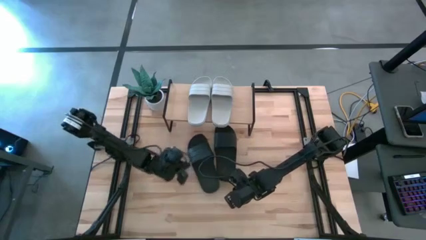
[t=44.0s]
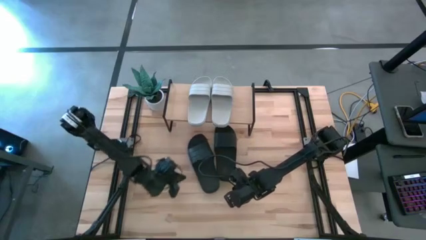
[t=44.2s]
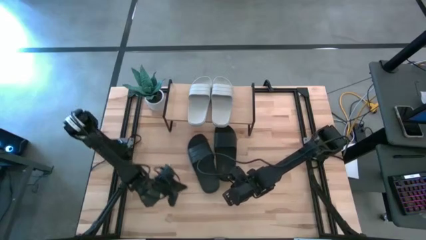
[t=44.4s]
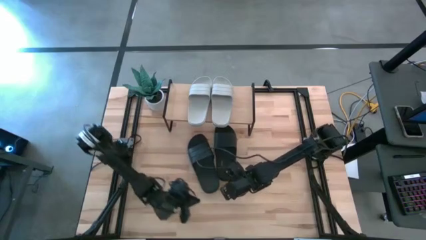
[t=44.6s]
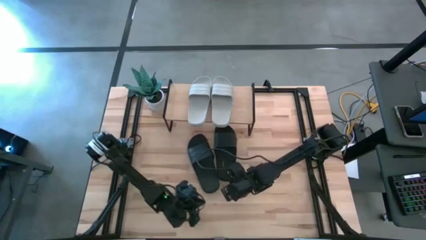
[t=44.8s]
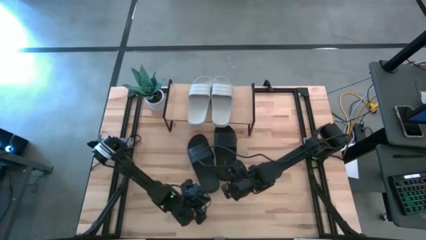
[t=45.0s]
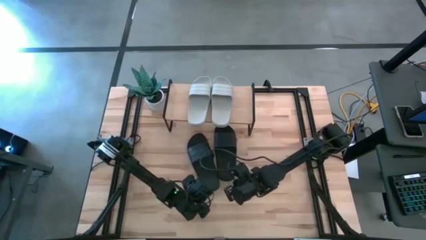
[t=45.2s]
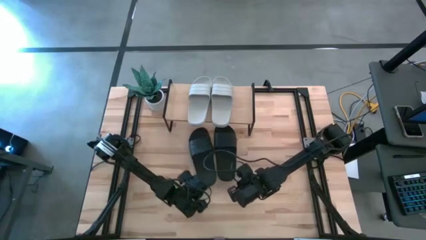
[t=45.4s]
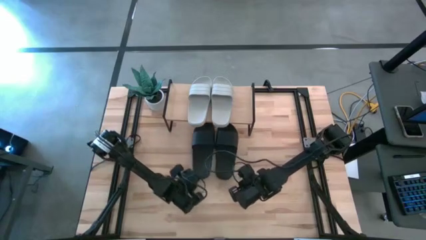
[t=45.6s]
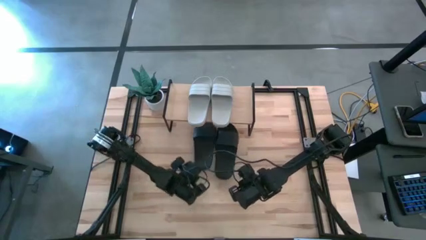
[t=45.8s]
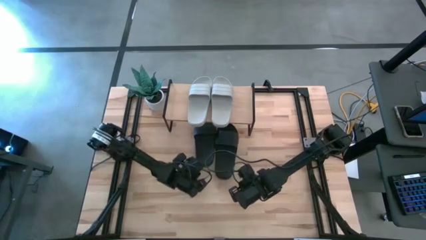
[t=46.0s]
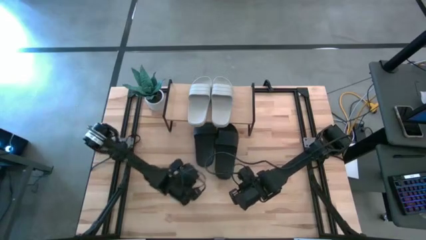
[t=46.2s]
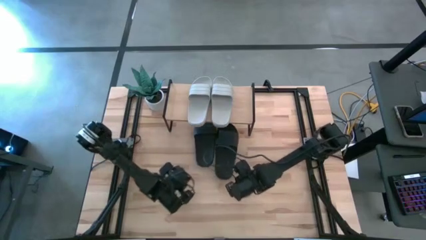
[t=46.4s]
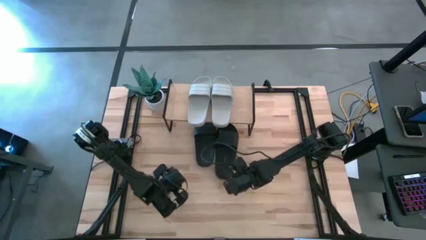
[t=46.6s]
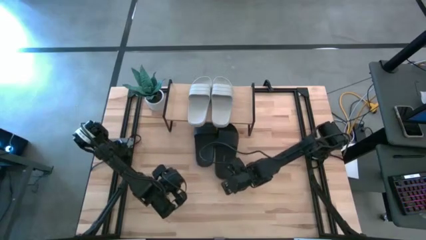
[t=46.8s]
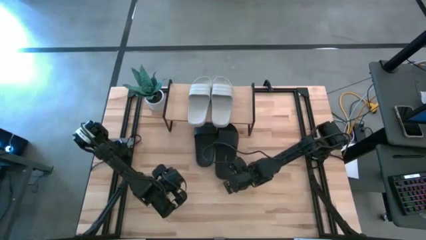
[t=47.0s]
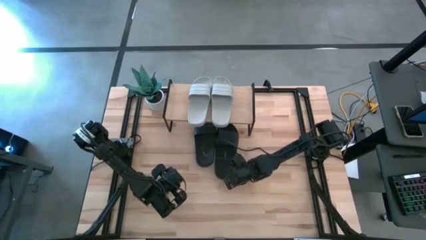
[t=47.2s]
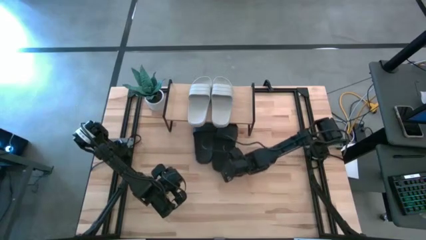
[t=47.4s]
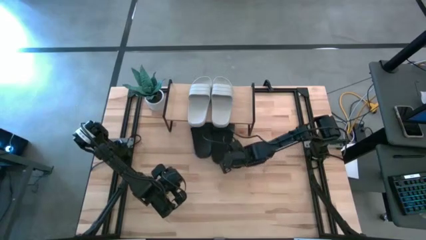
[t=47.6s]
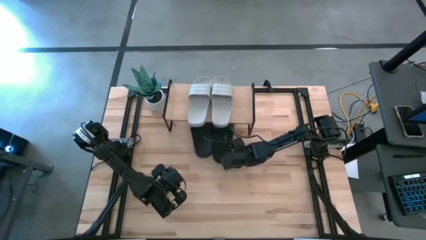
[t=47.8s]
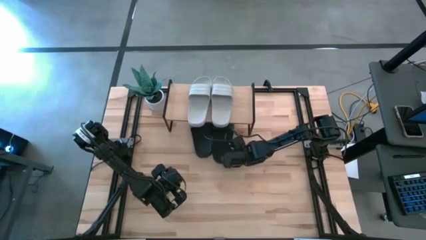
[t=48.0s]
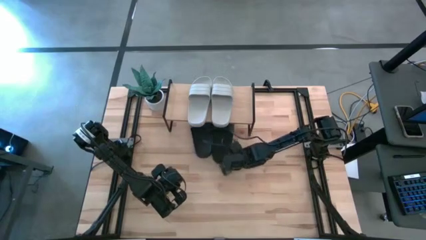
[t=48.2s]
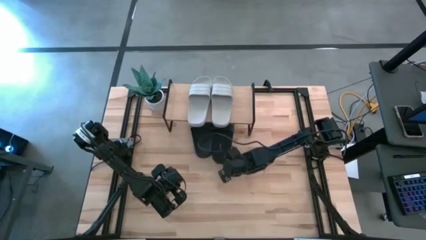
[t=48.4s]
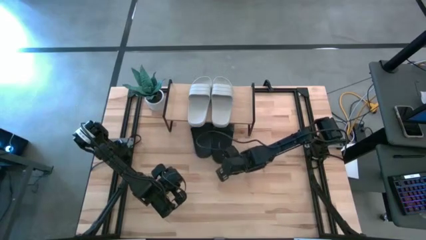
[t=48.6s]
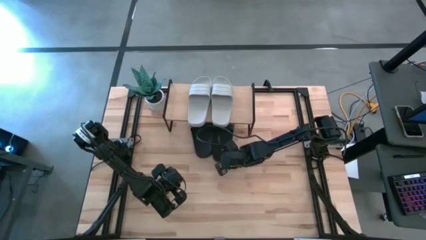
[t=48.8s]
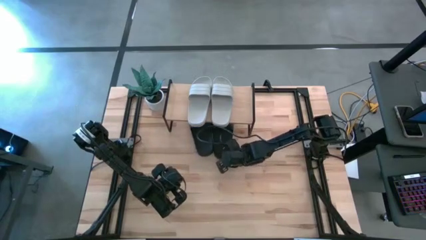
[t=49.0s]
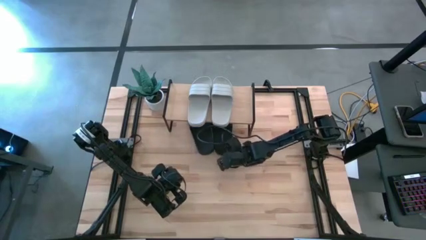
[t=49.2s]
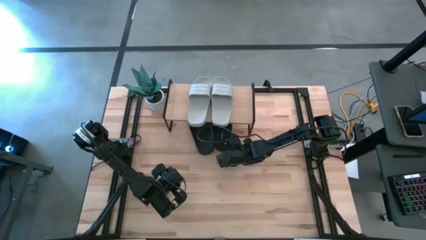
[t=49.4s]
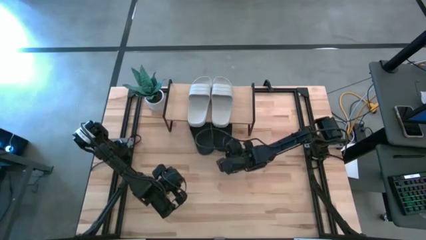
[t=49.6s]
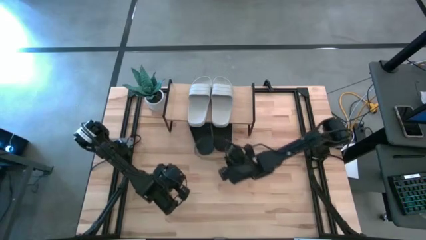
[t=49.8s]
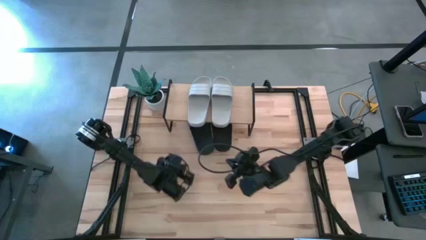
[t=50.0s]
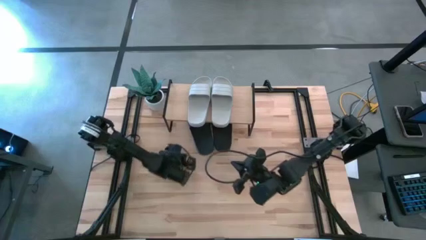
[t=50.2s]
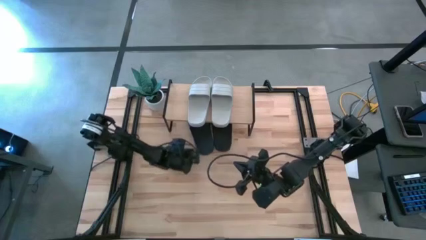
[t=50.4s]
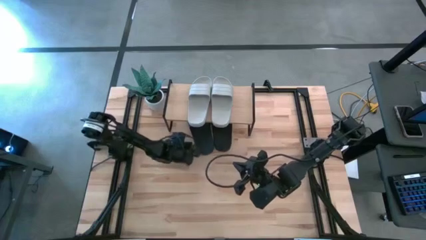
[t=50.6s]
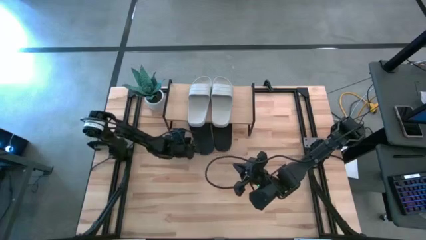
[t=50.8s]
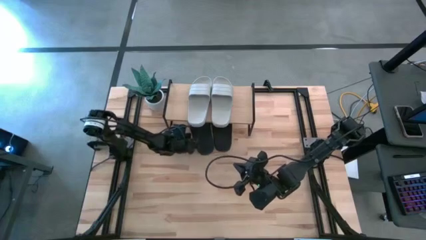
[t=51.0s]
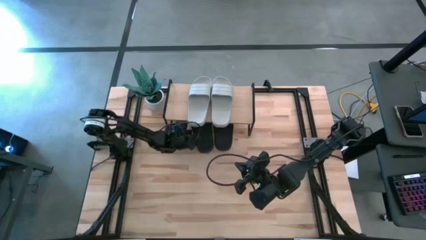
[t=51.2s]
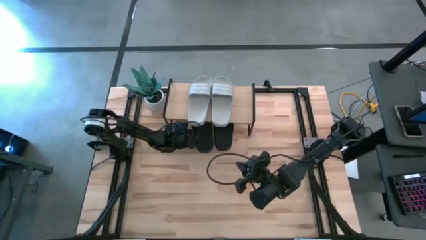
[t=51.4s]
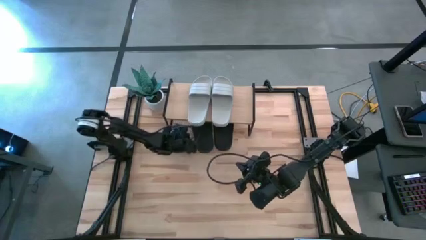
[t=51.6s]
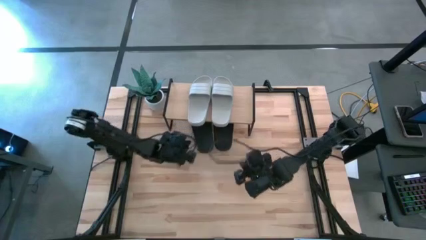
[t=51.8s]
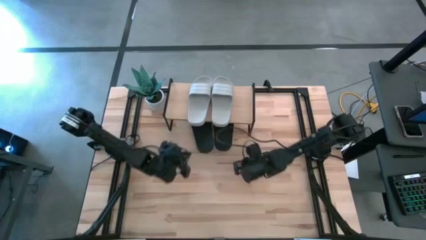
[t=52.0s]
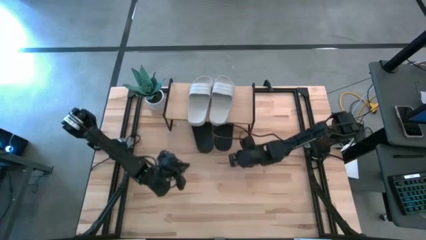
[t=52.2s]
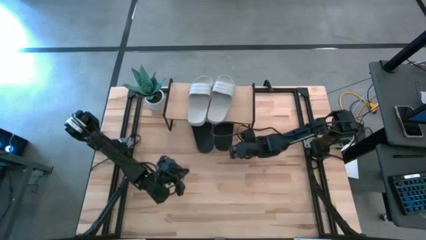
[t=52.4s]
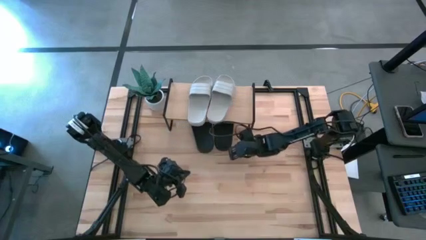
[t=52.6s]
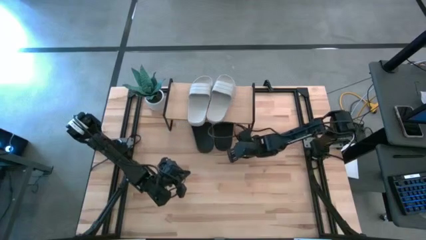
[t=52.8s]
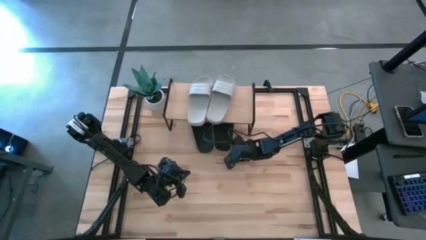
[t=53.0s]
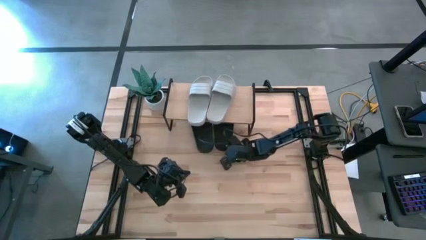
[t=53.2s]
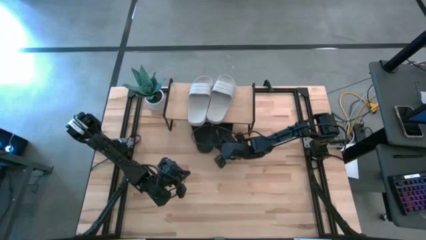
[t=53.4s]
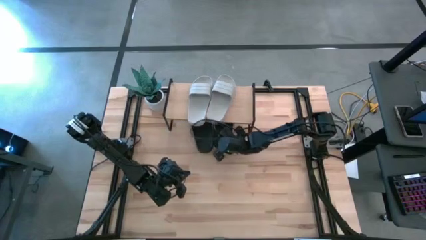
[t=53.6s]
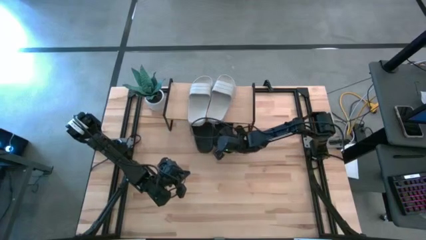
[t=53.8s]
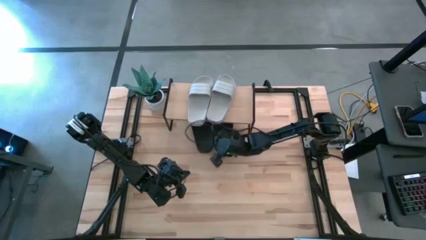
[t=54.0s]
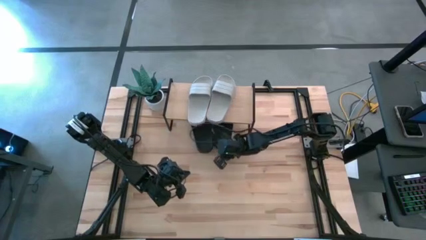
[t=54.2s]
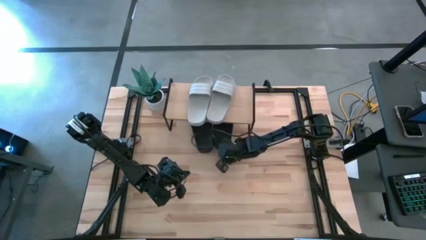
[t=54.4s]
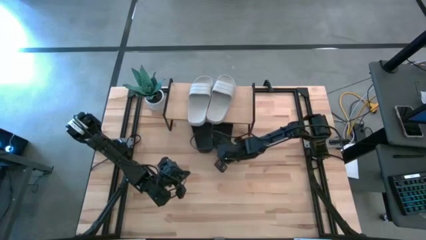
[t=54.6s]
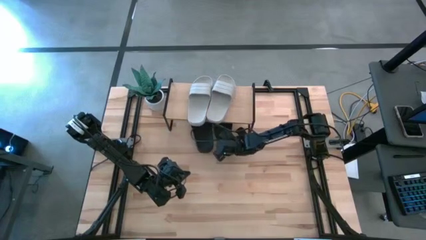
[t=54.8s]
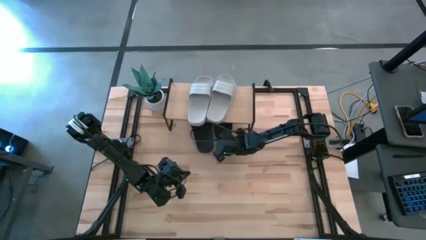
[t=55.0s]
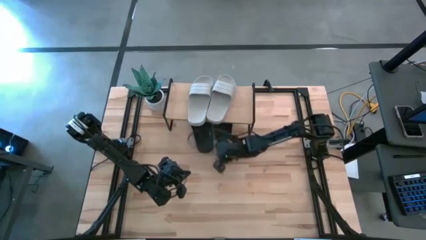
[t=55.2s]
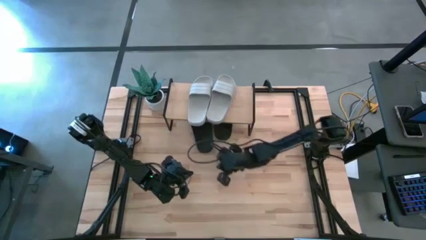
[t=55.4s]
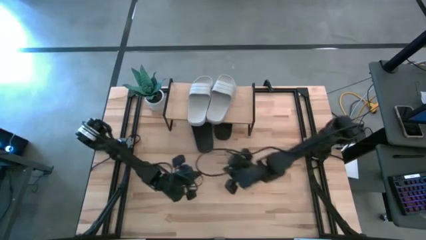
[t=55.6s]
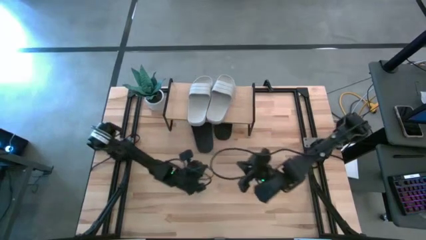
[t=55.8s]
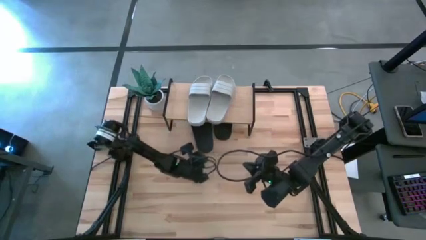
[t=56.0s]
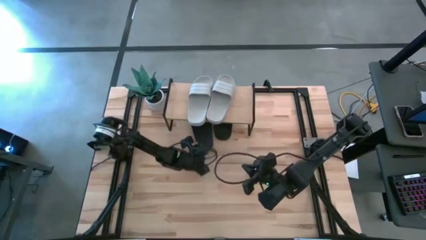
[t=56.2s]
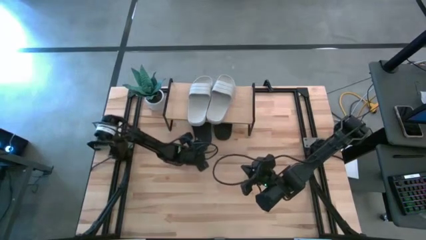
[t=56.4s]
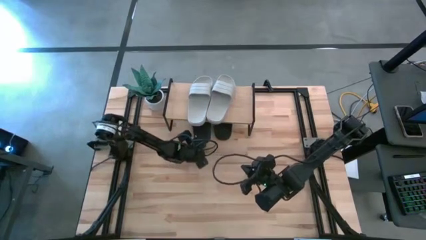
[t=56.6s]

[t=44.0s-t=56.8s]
Task: Pick and place slides into the shelf
Adjust the black slides under the shelf
